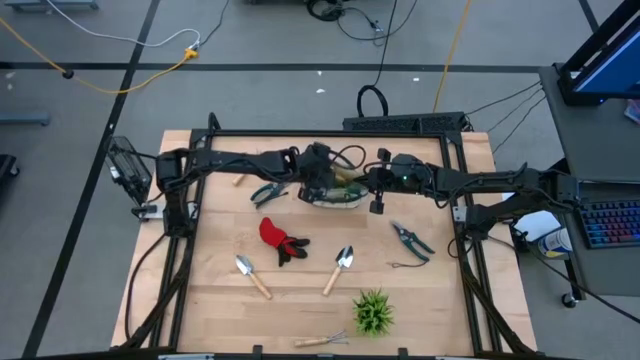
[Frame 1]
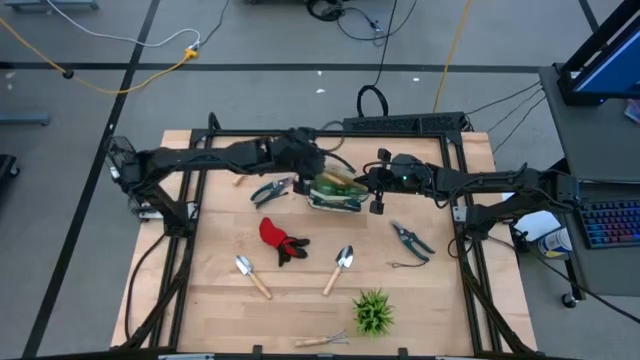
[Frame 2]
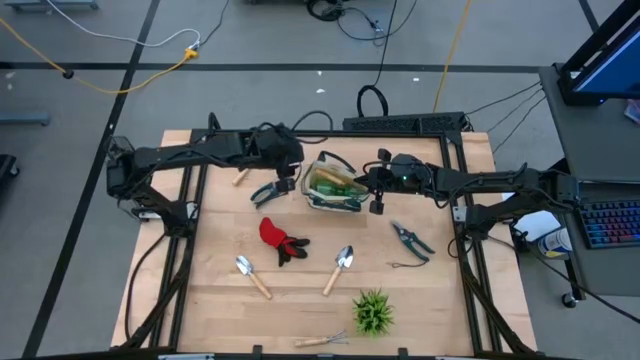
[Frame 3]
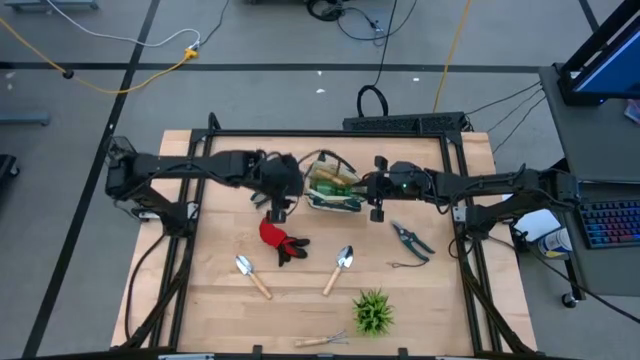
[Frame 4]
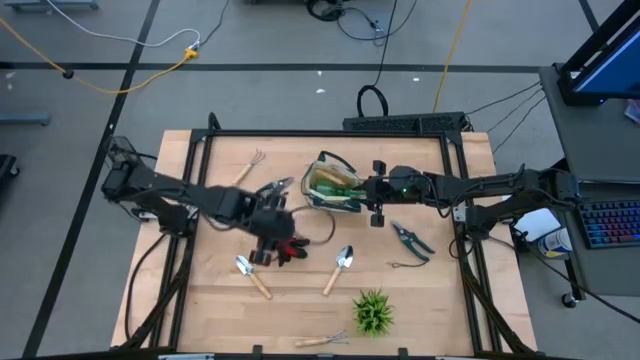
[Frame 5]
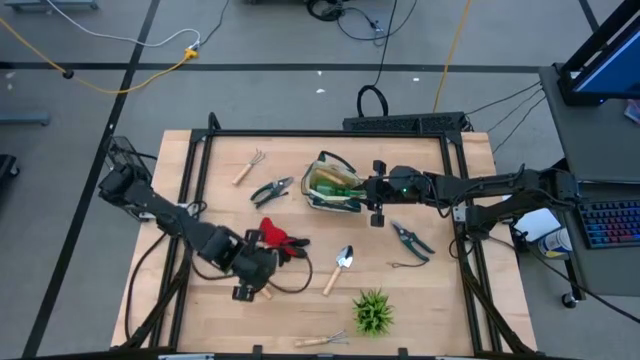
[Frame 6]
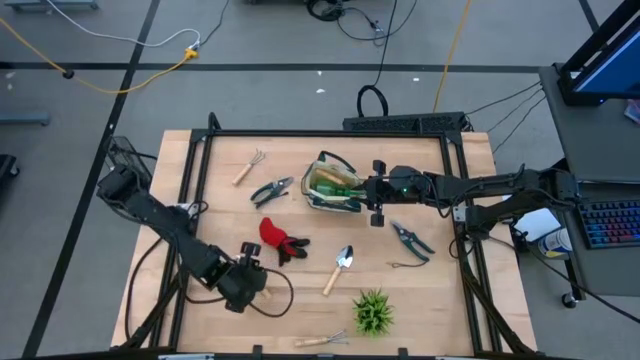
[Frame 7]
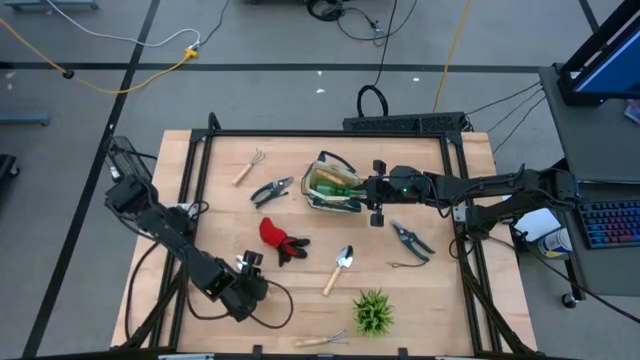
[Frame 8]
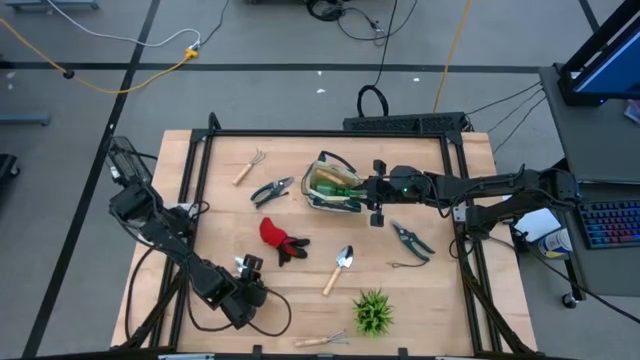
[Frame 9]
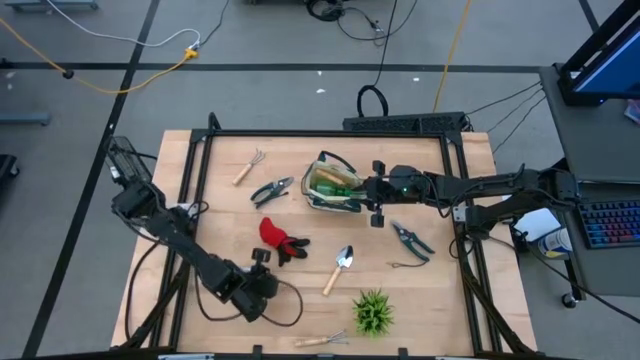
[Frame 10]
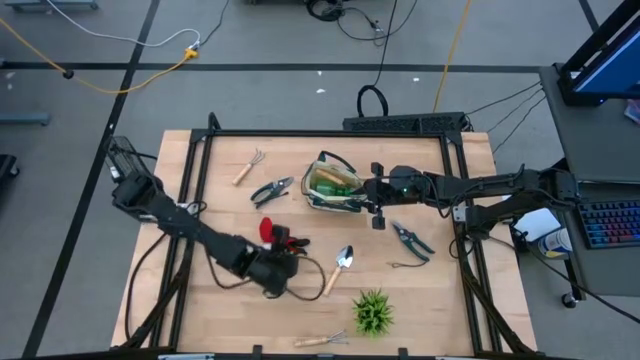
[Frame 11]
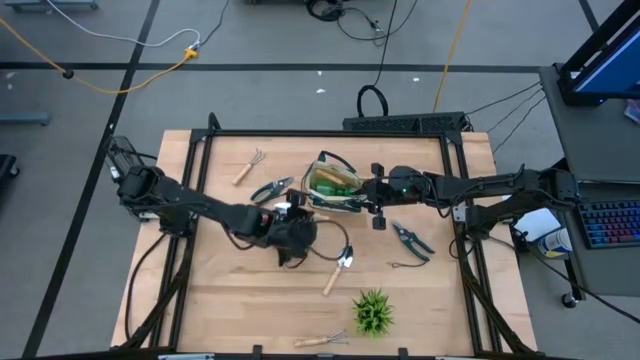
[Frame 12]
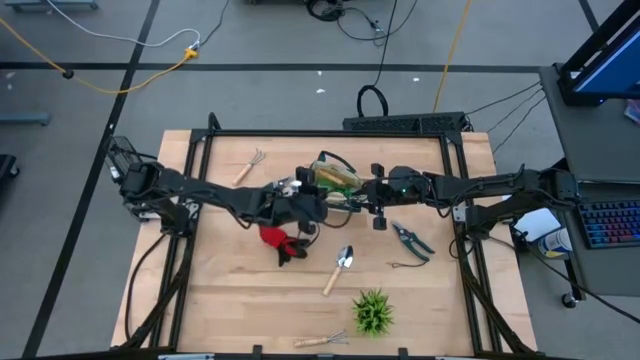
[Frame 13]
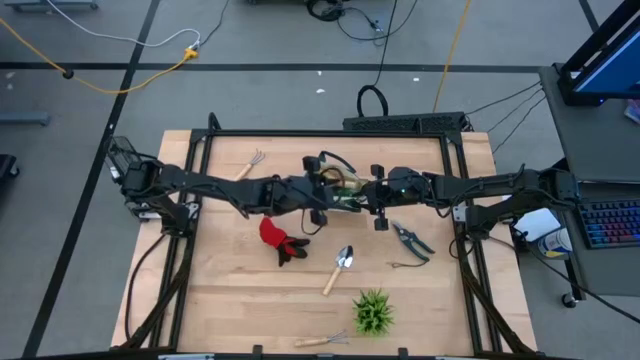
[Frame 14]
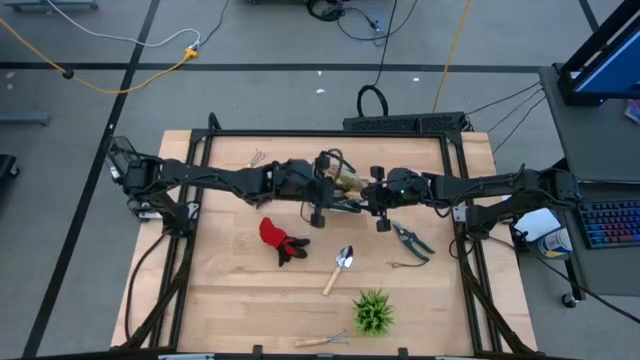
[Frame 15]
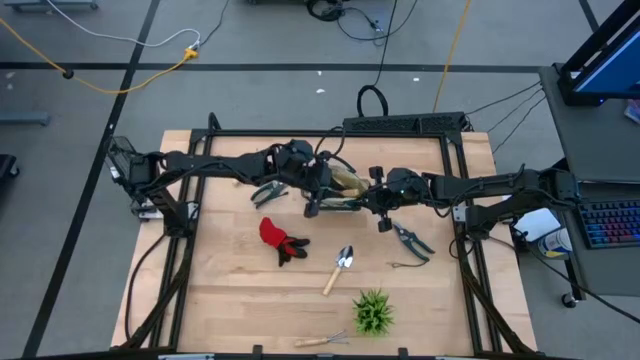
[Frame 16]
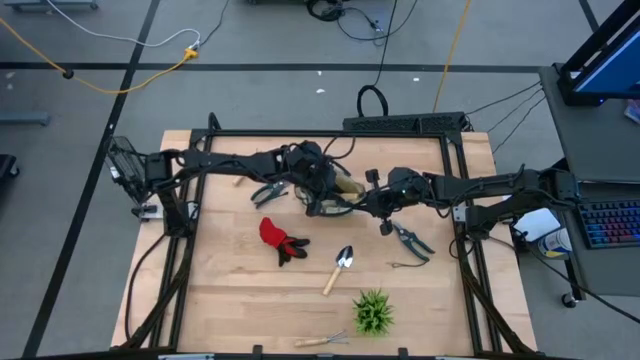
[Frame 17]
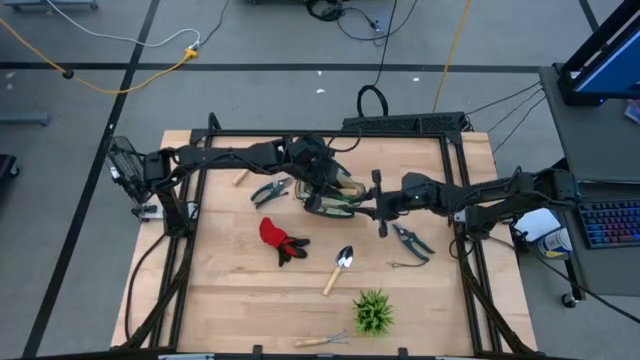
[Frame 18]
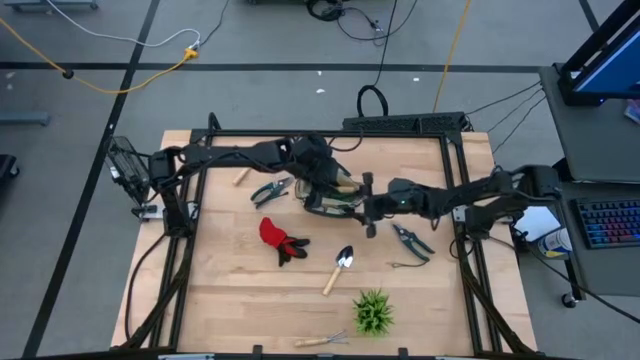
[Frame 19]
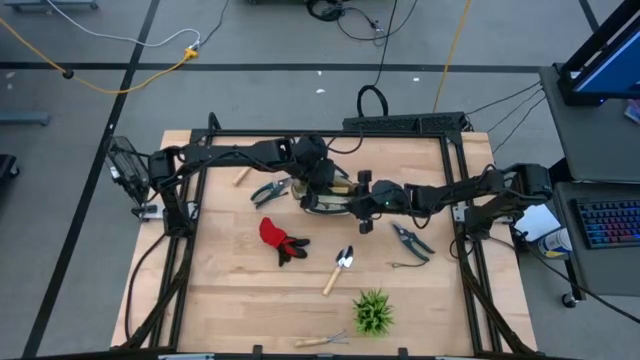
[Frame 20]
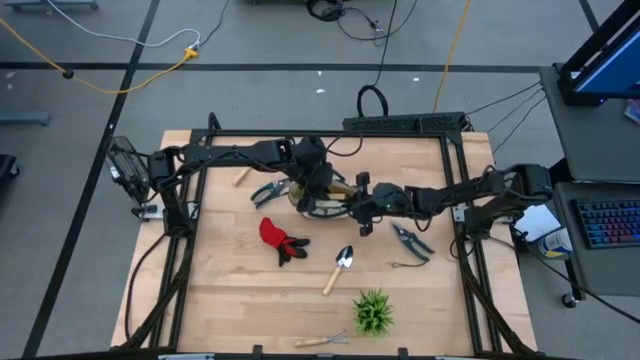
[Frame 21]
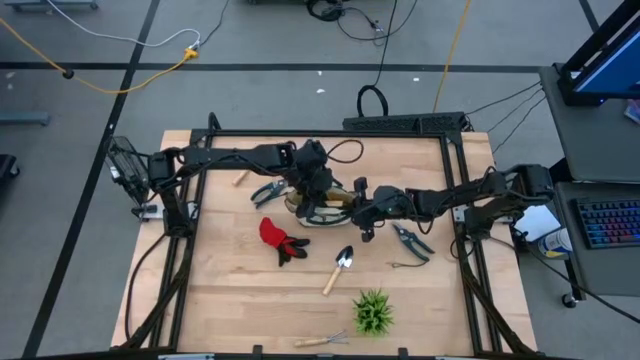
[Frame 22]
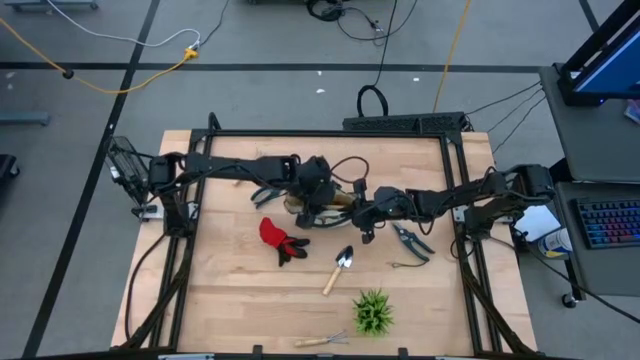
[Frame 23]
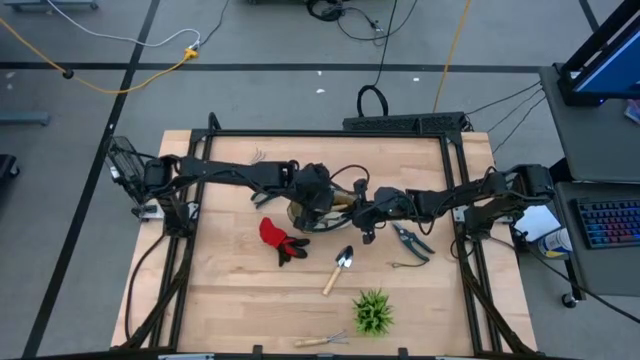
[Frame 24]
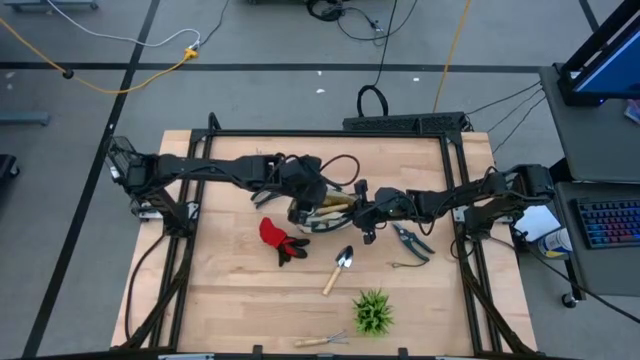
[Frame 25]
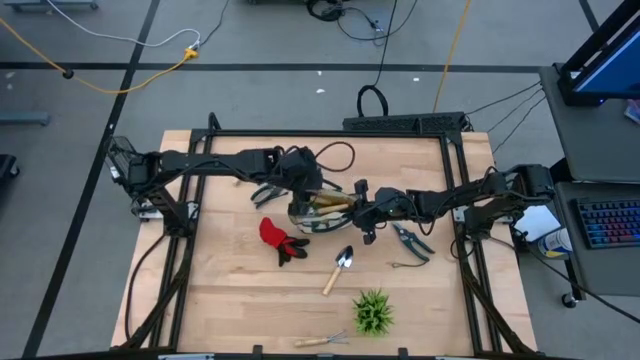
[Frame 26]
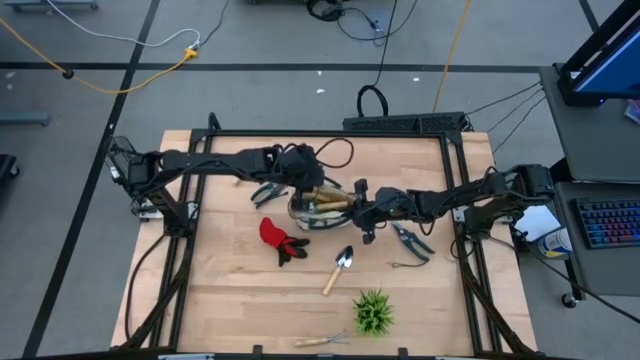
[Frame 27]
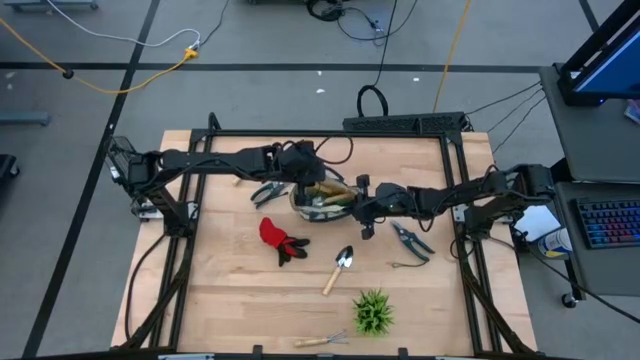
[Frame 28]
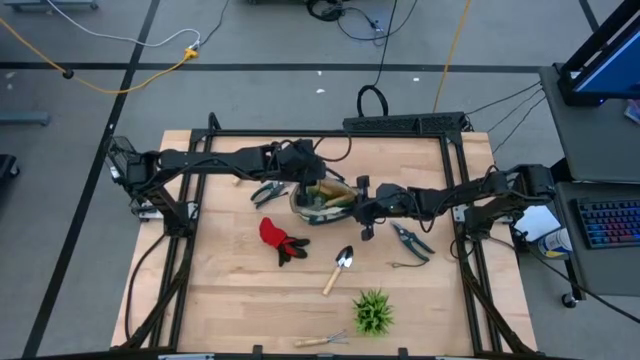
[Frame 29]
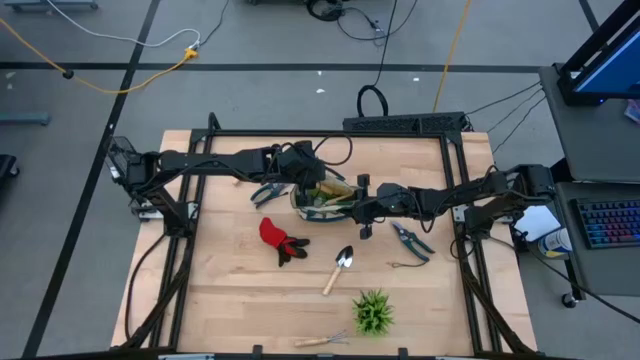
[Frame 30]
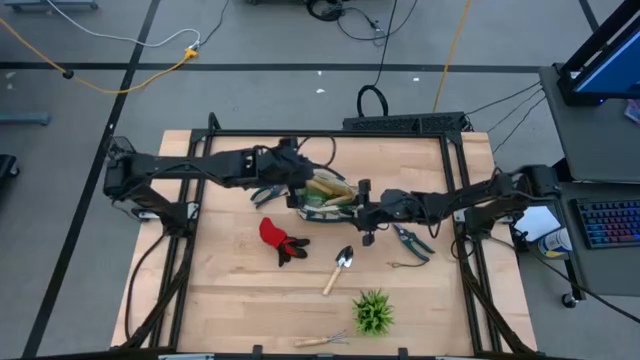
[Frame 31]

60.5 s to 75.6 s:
Task: Pick & Place Garden tools in Gardening bag
Put the left brown trowel into the gardening bag

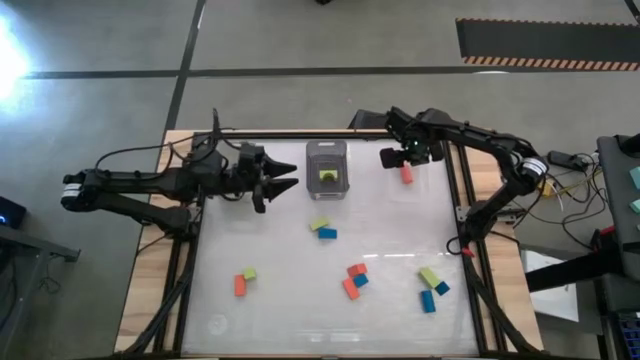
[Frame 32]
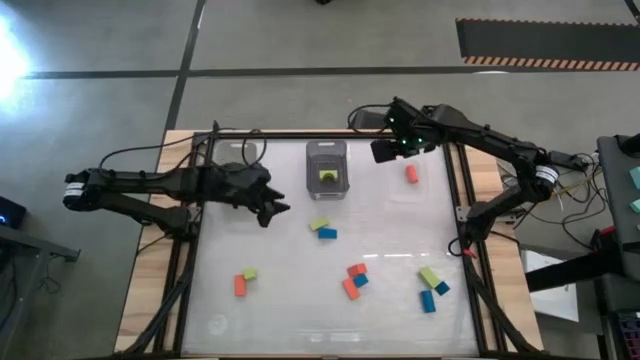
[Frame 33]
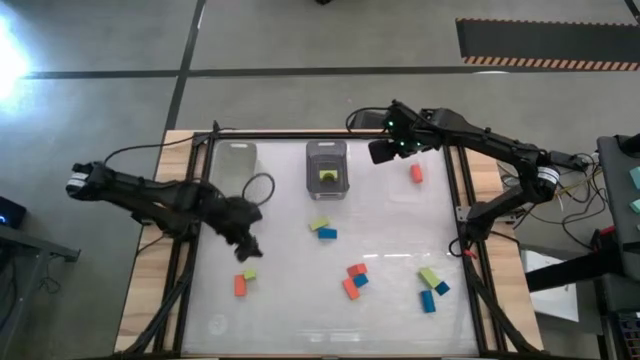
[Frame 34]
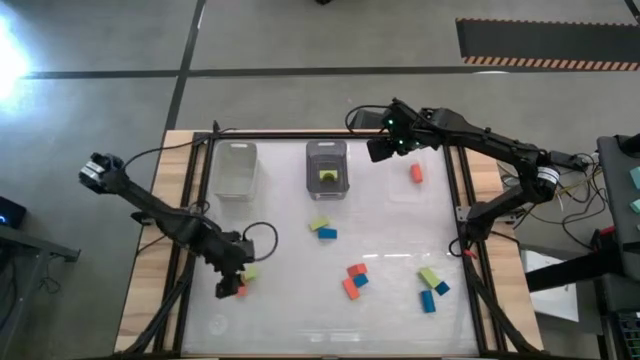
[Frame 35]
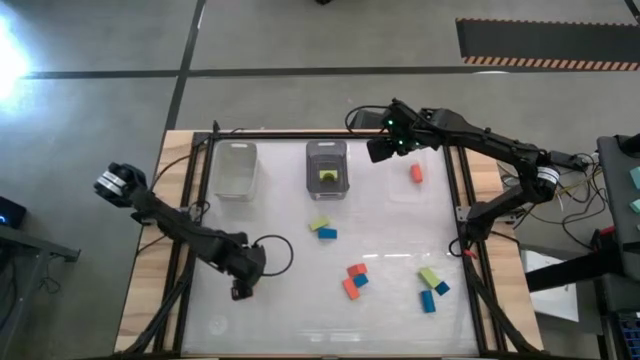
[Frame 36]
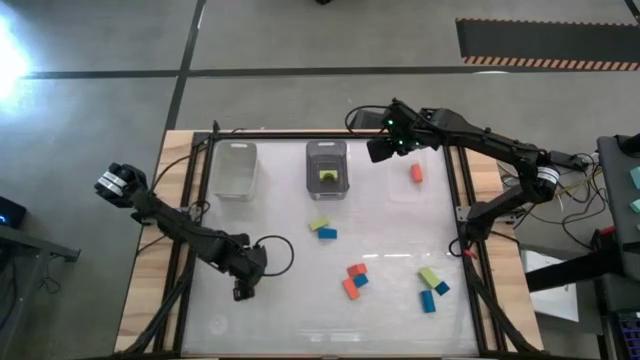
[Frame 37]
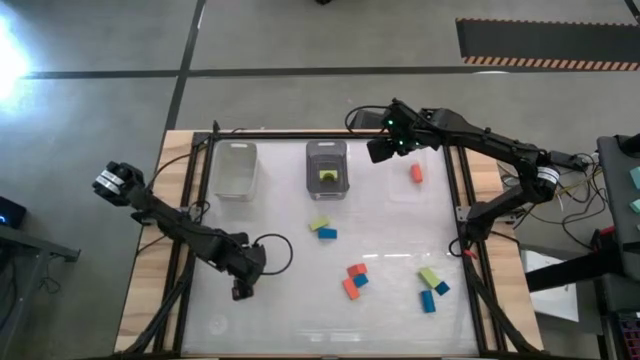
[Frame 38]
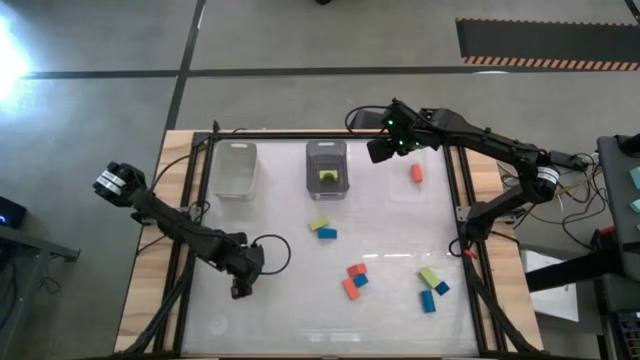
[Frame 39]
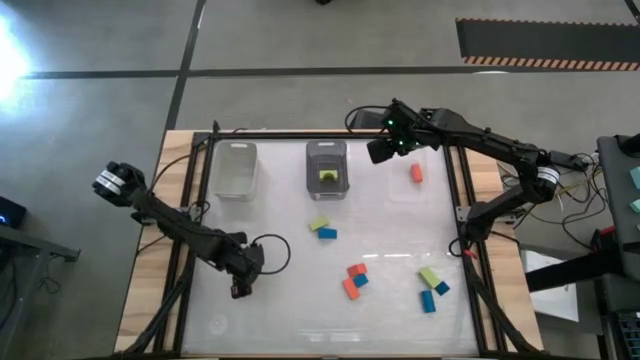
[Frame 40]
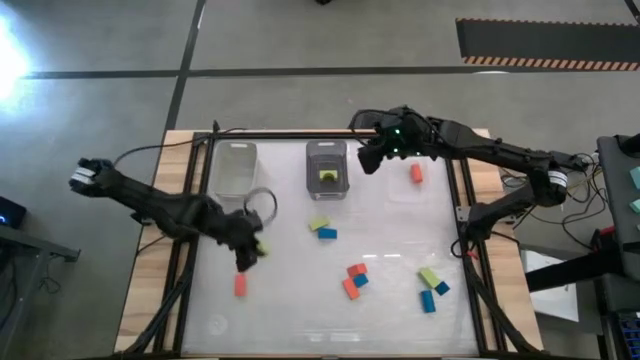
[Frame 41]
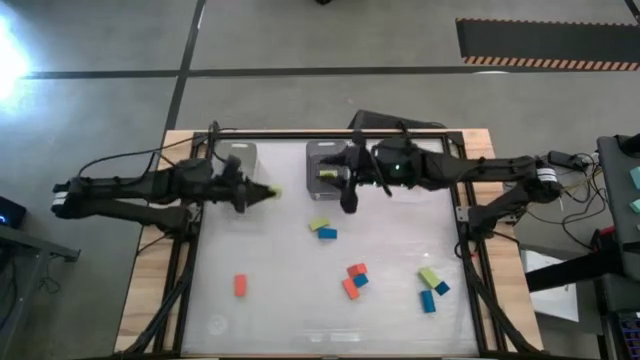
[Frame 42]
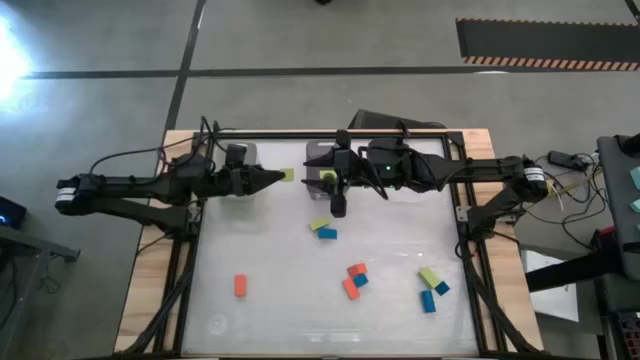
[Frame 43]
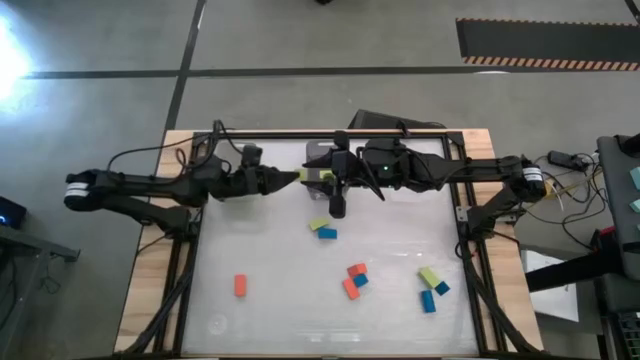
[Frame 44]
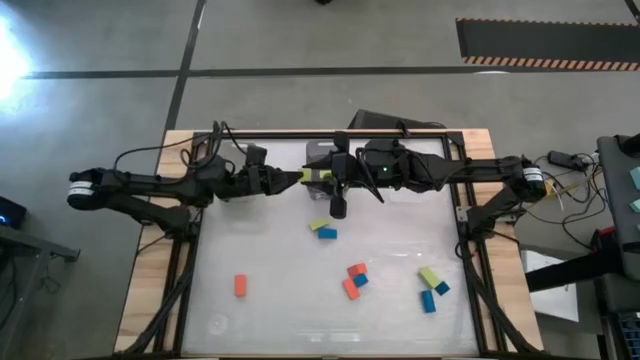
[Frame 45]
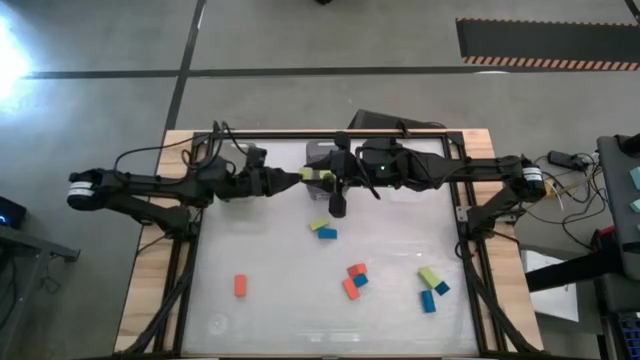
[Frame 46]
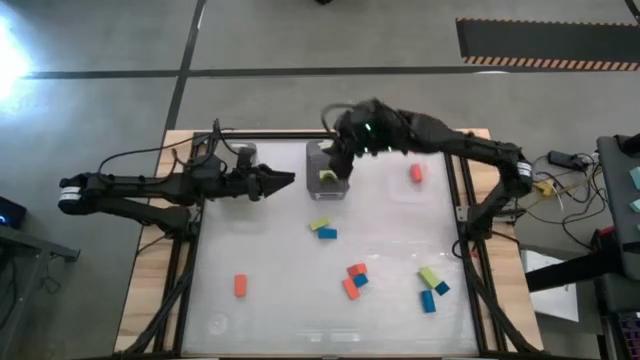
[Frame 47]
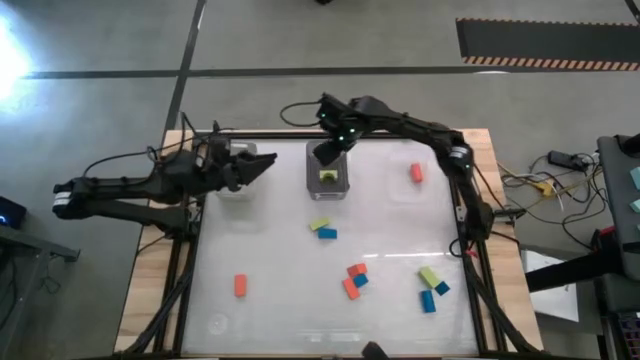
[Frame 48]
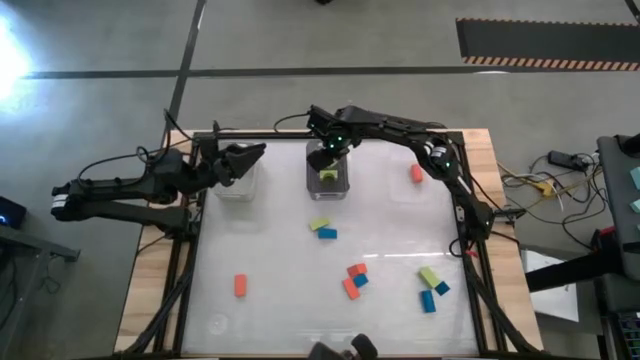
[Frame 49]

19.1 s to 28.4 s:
Task: Sort & place blocks by color
Put the green block into the black transparent bin
